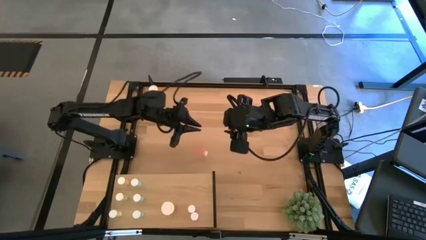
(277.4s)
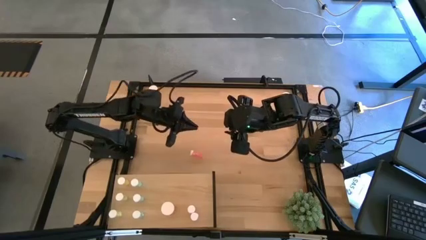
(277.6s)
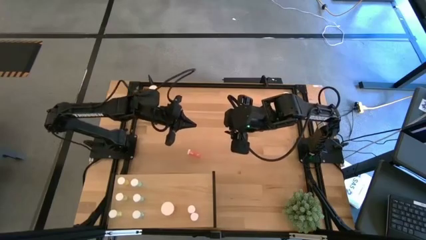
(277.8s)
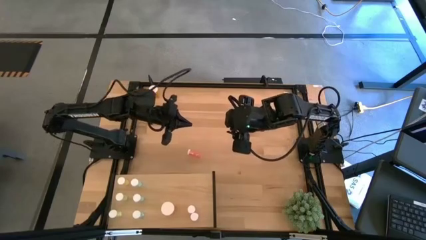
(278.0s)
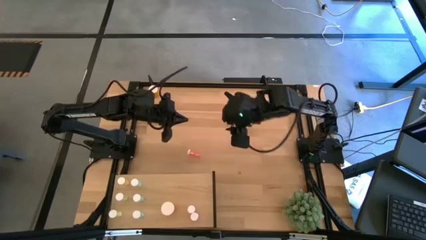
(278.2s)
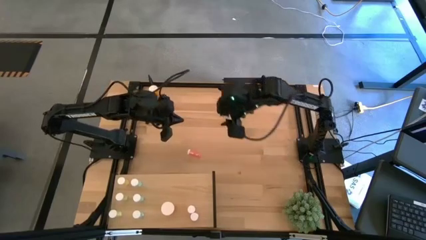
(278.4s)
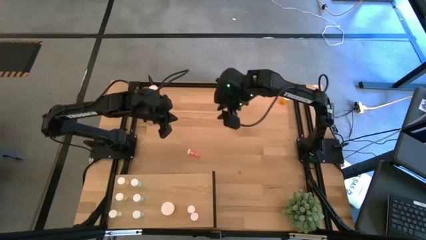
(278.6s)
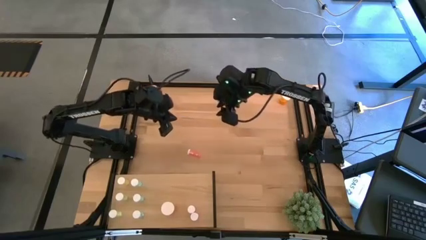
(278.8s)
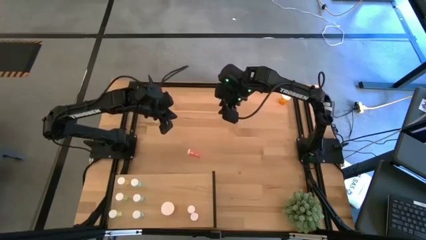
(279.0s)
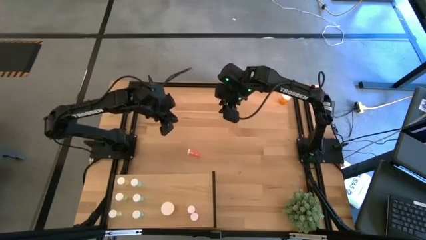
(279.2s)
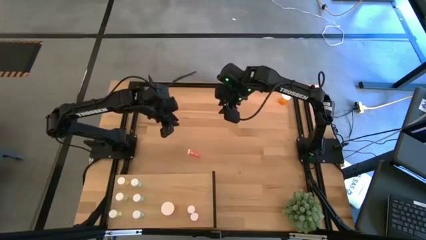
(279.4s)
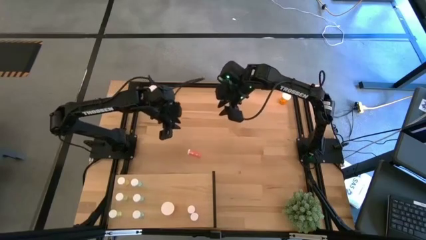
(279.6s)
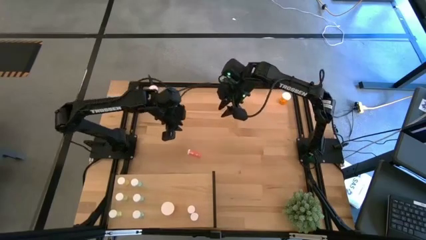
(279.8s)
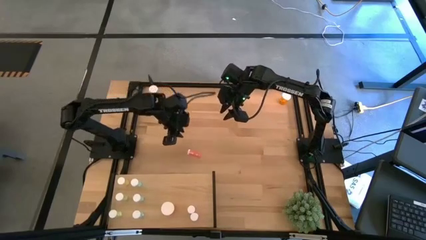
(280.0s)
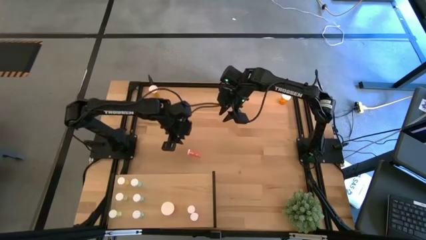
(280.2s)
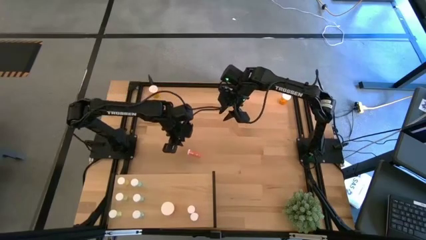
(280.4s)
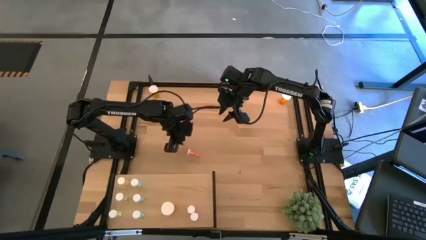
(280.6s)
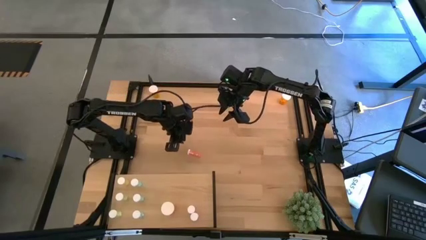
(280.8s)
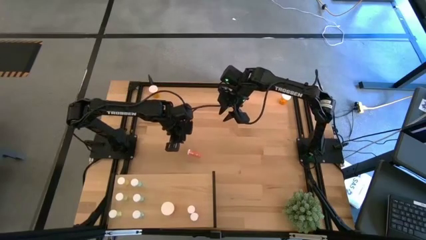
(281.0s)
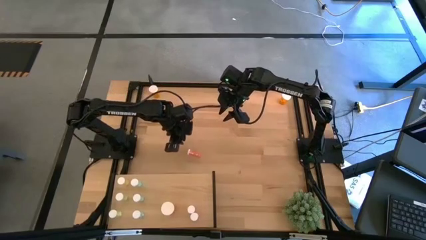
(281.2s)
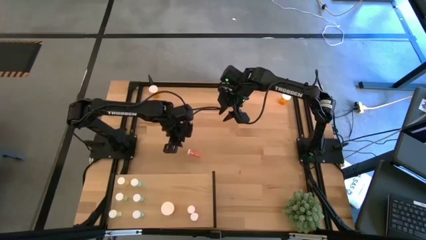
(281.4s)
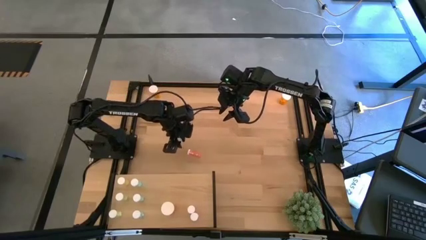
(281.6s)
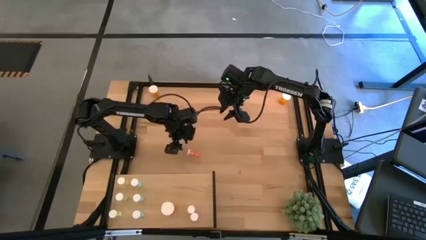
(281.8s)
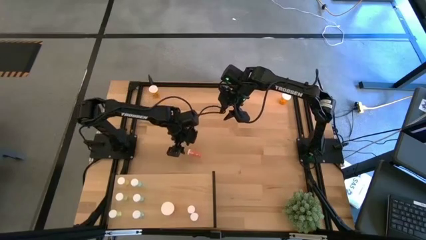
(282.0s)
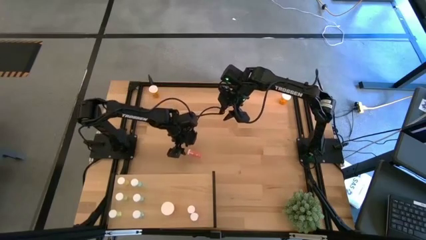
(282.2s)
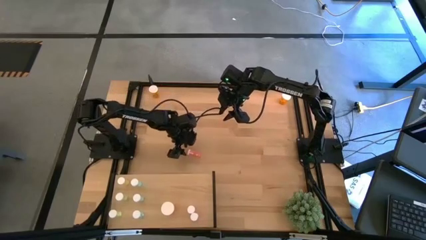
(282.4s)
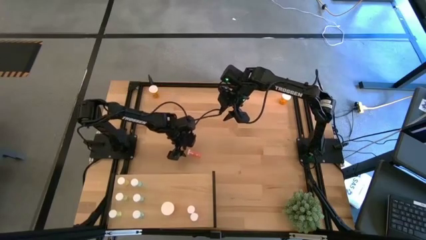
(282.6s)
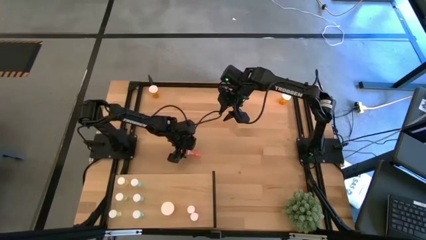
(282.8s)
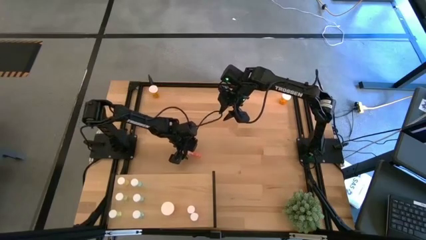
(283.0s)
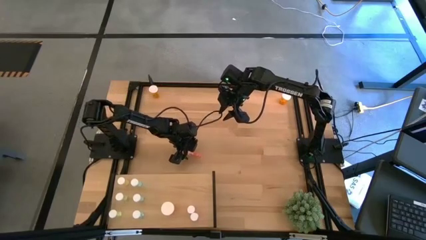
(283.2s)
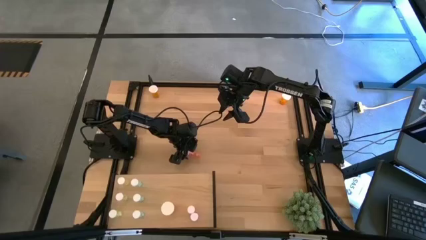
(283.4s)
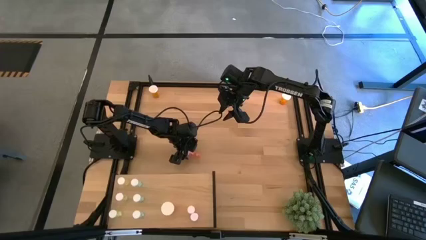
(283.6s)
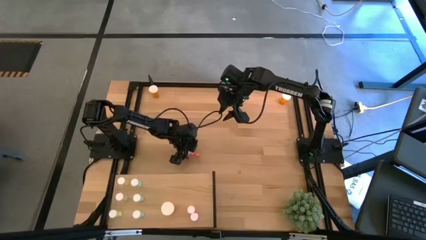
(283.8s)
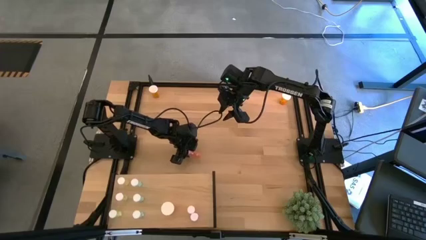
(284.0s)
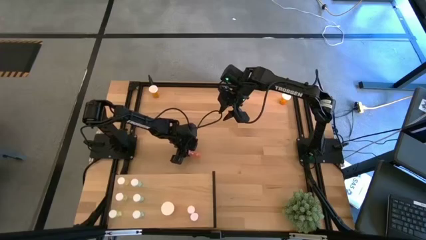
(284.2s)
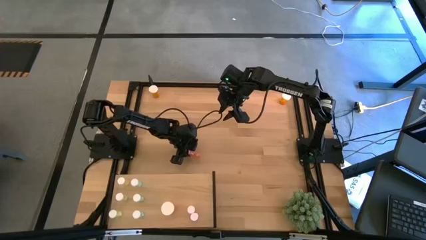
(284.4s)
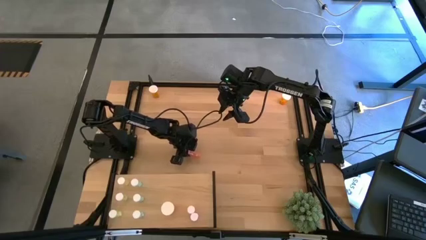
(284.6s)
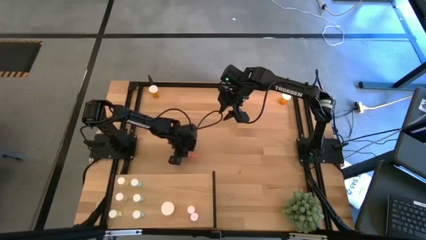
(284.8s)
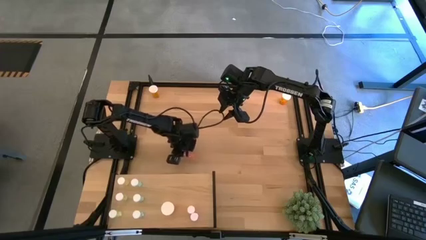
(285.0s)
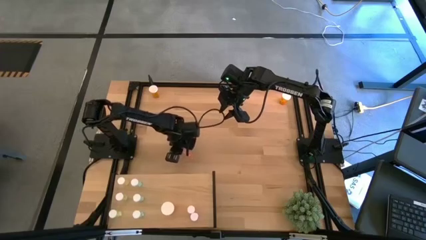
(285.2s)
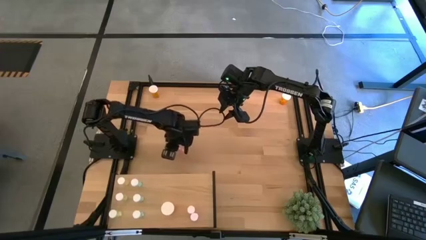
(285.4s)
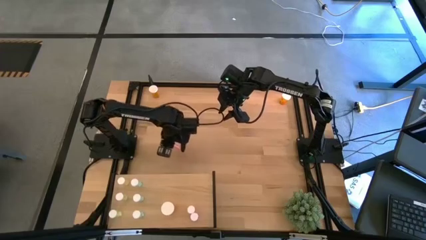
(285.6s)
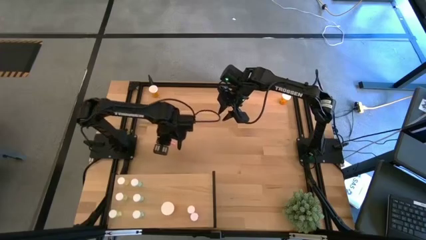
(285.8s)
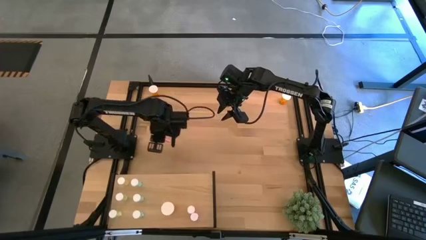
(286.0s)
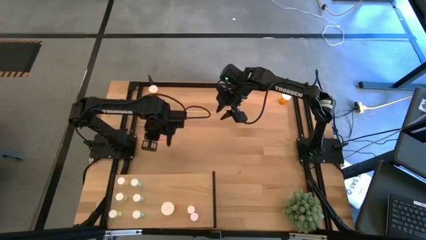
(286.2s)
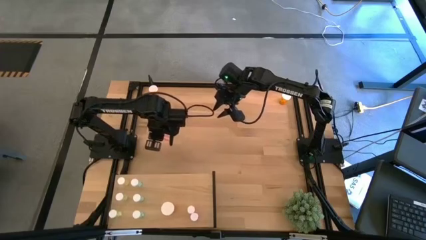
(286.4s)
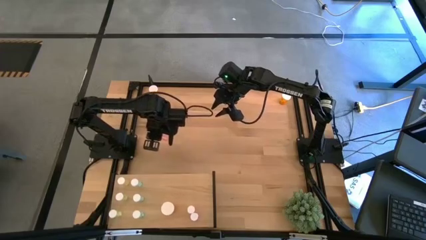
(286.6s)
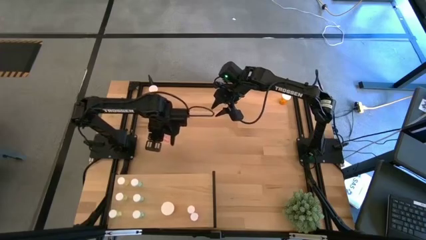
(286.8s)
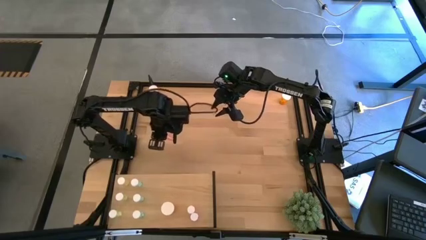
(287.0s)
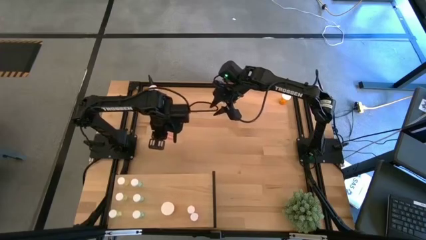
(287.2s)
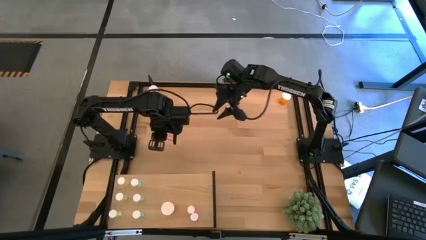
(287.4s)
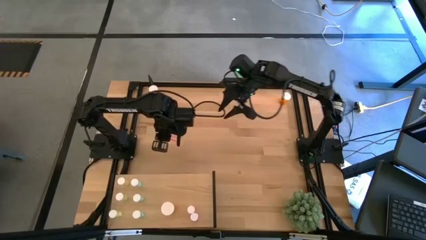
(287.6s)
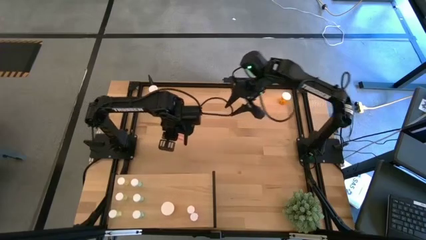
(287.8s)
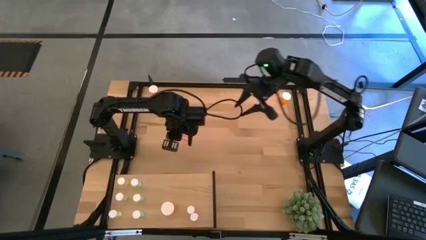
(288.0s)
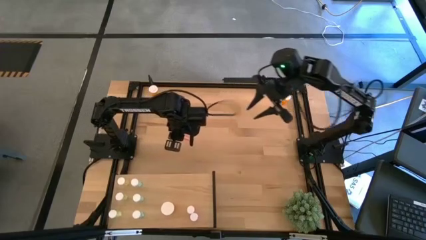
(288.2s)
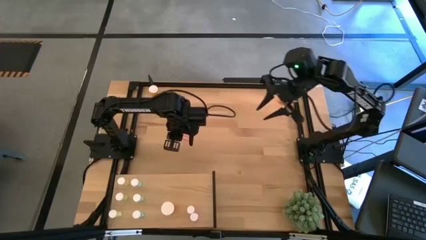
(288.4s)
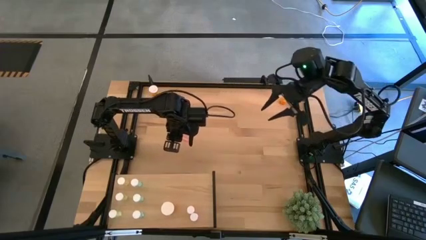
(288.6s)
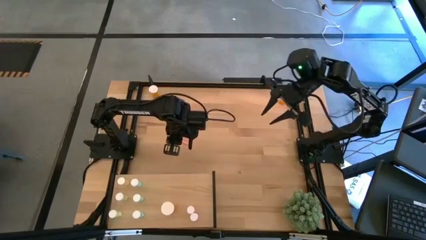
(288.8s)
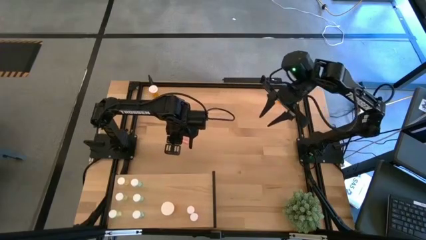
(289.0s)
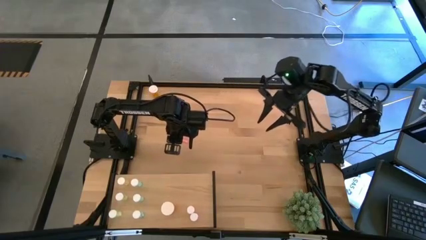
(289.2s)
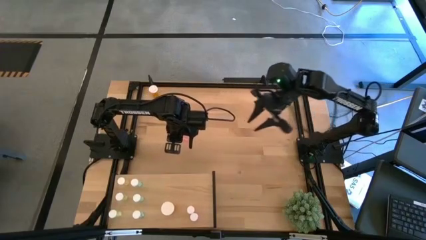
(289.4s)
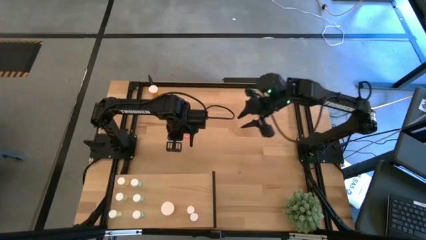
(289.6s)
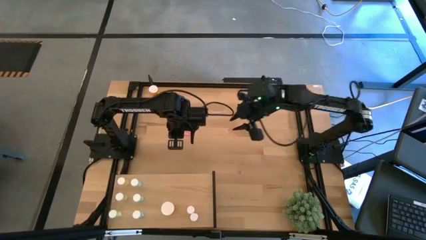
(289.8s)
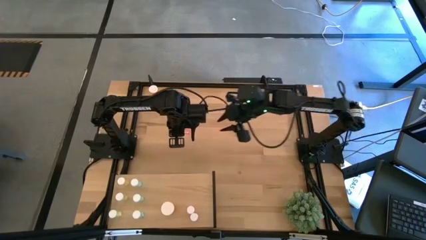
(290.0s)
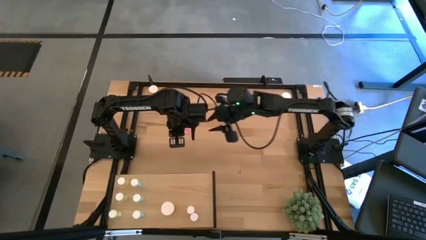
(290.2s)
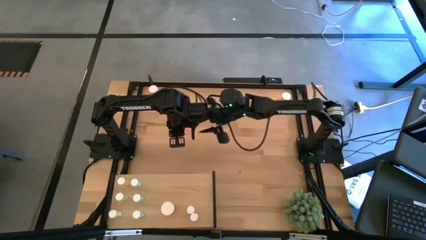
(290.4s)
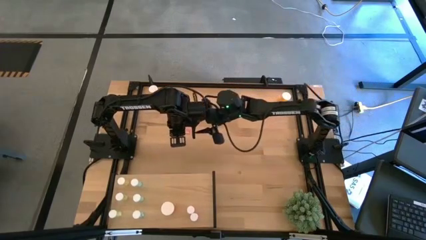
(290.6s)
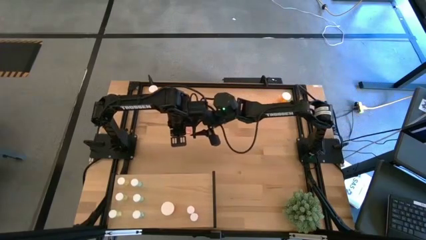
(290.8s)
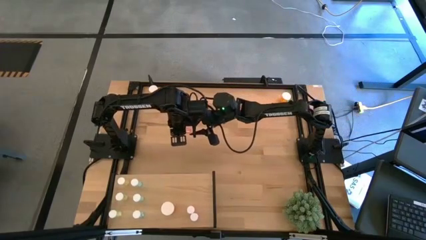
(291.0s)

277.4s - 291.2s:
Task: Pick and place medicine bottles onto shelf by color
Put the pink pill bottle on the shelf aligned with the other pink pill bottle

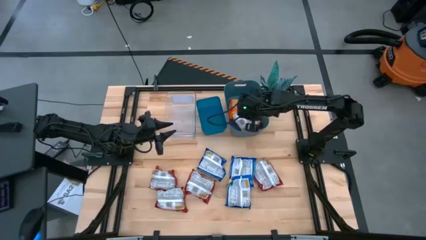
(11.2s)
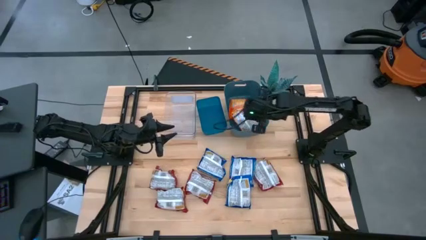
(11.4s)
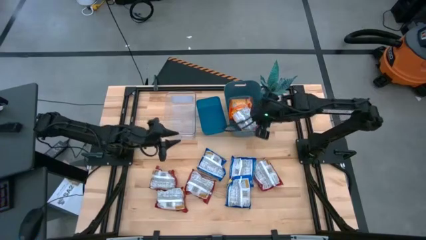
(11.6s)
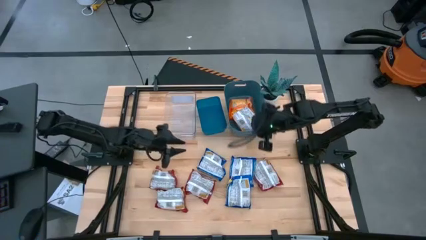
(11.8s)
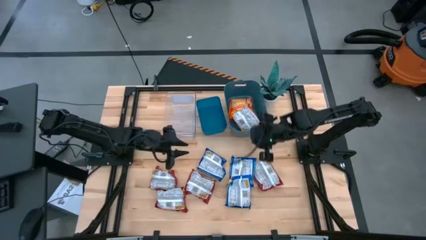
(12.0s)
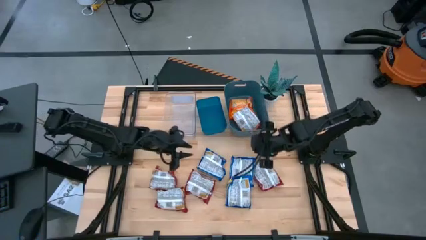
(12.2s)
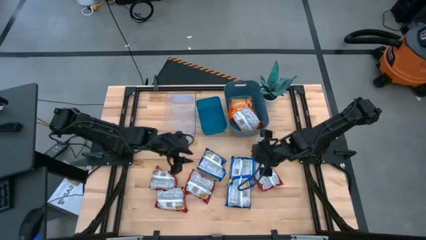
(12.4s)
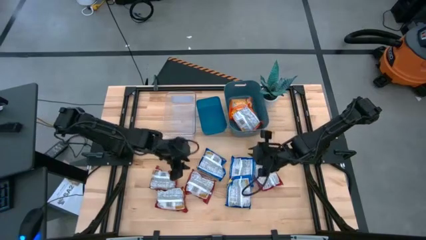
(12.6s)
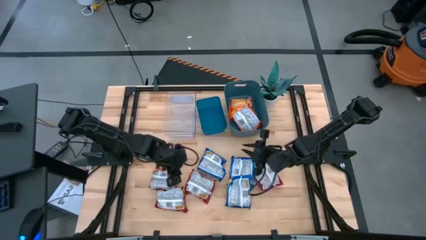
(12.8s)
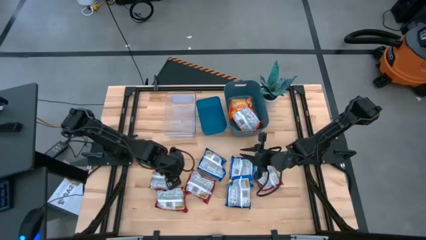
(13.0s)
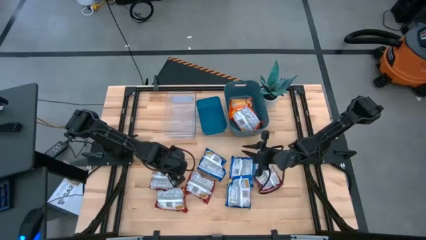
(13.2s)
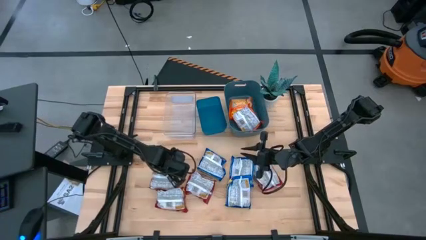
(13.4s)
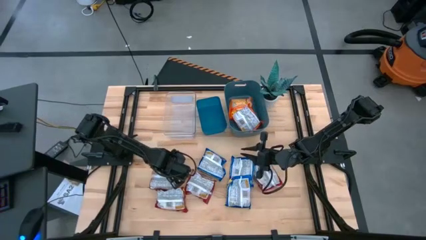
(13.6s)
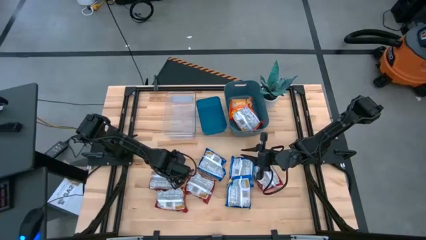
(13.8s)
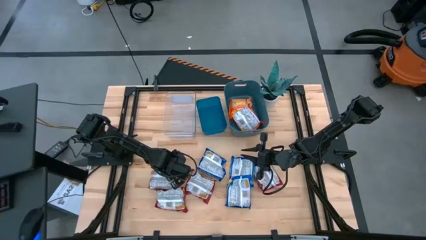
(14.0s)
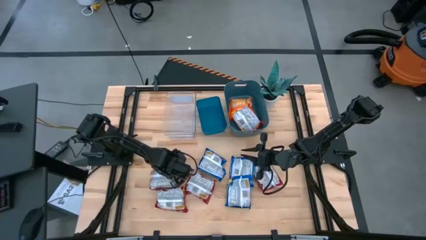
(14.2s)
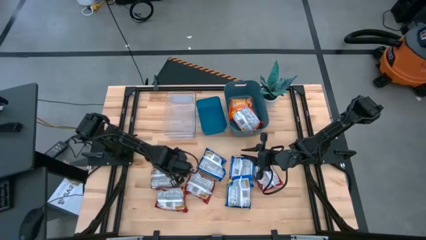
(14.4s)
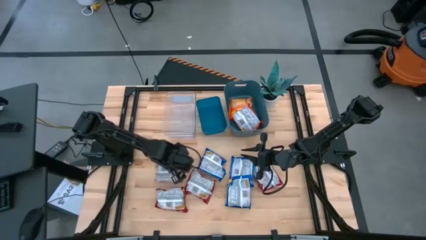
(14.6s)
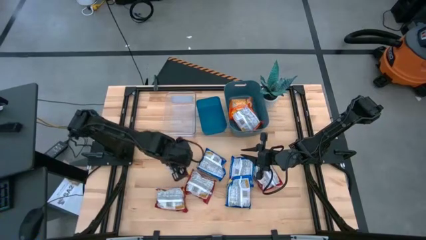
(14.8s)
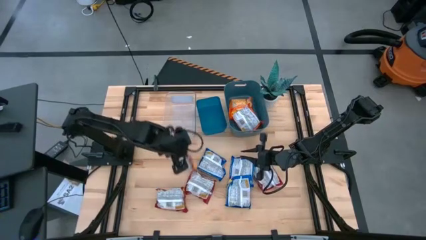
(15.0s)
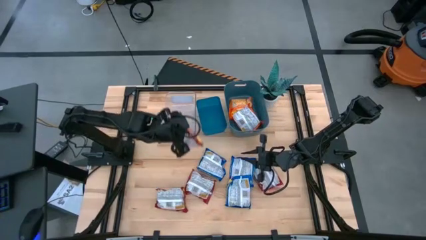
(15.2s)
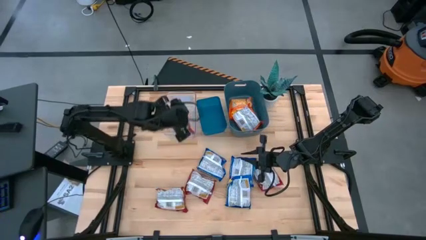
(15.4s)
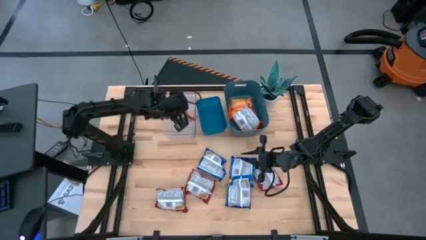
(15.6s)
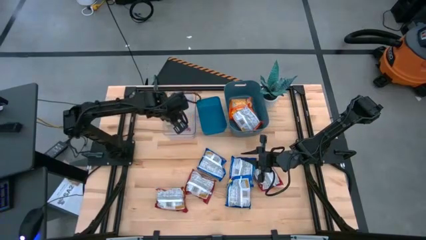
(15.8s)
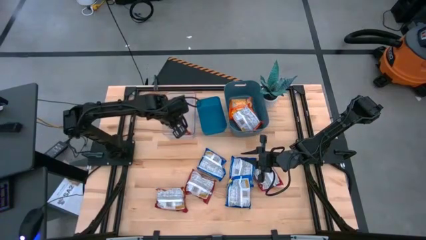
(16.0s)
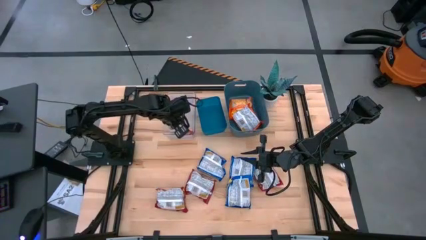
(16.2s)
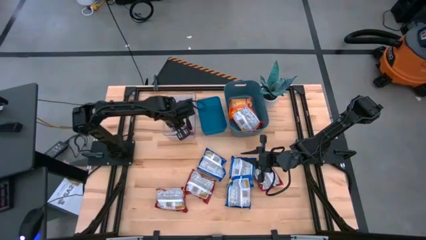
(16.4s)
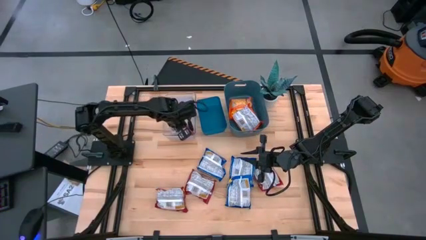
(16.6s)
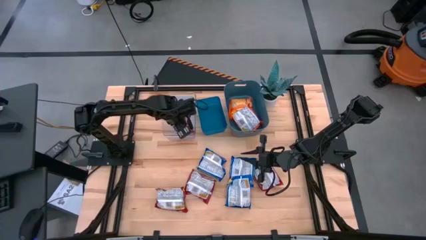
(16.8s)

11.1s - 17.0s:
Task: Sort Maruchan noodles
Put the red noodle pack into the transparent bin
